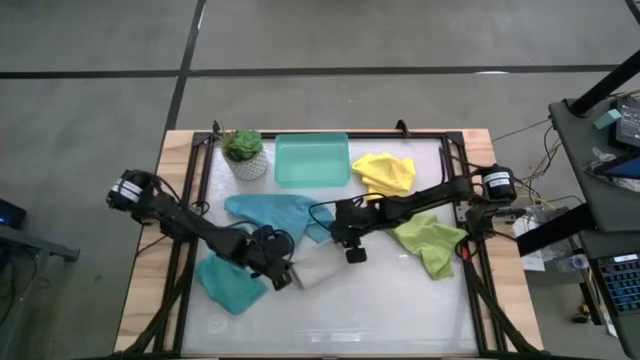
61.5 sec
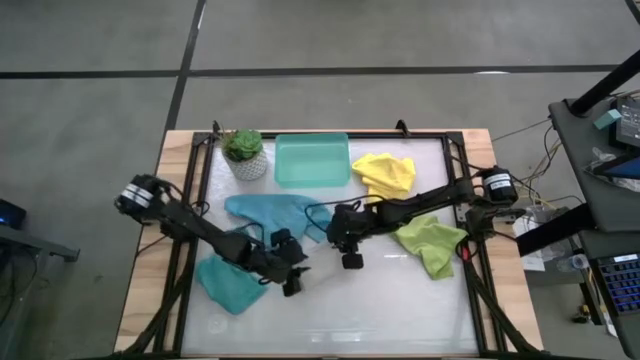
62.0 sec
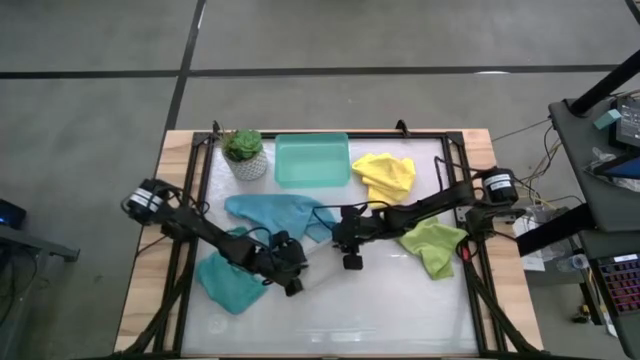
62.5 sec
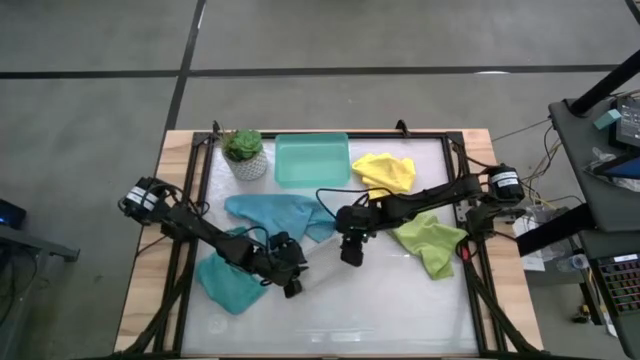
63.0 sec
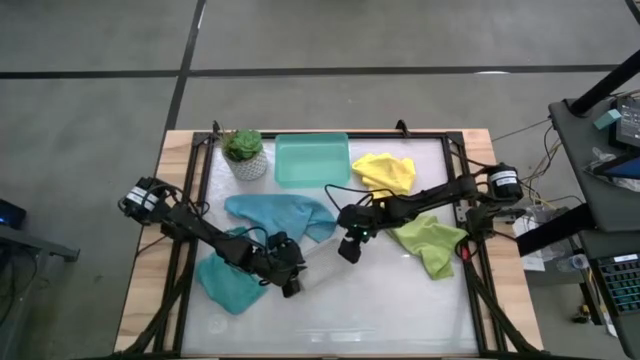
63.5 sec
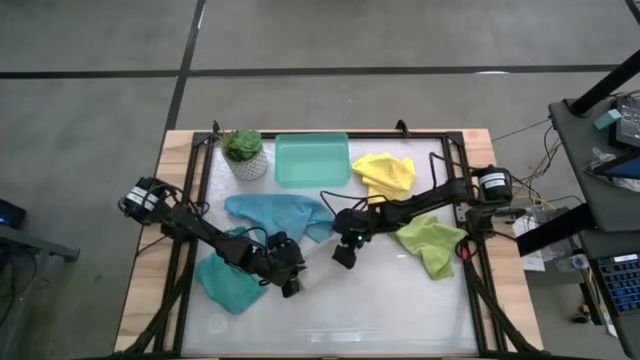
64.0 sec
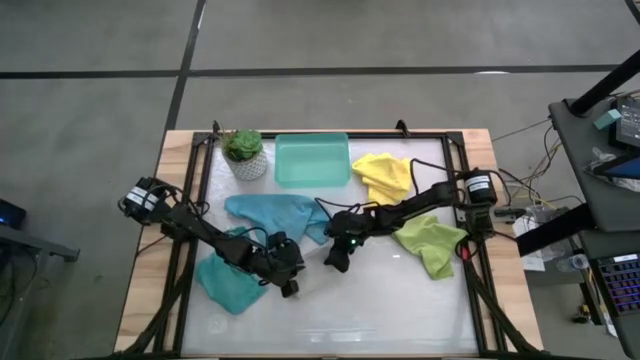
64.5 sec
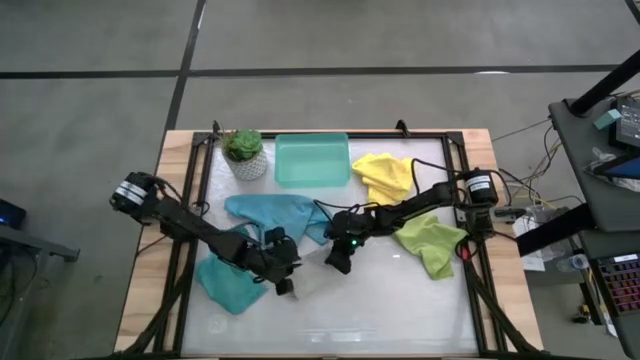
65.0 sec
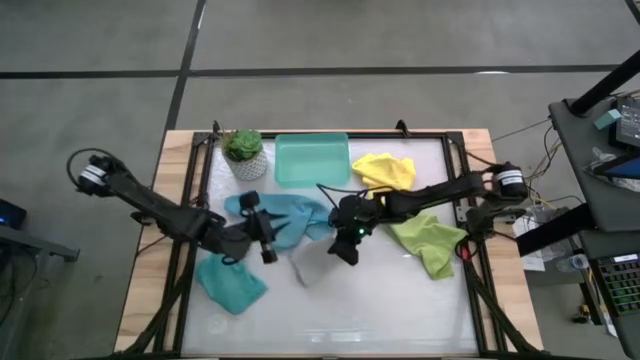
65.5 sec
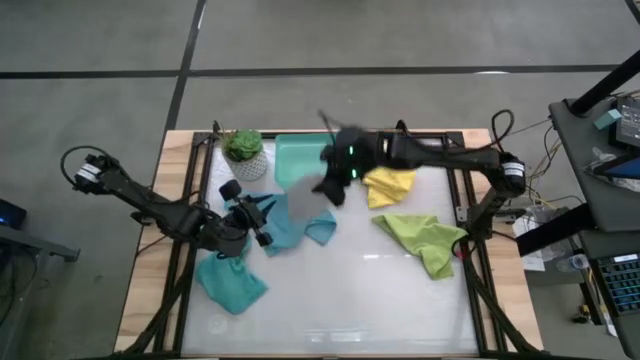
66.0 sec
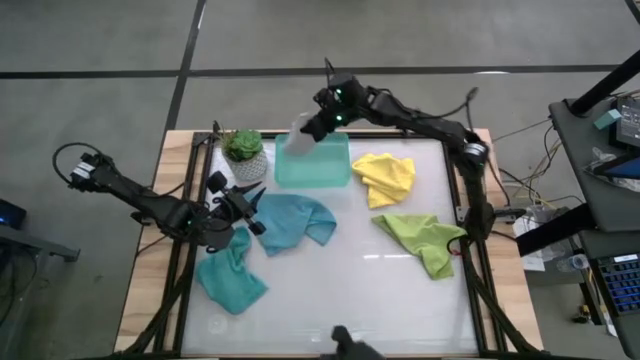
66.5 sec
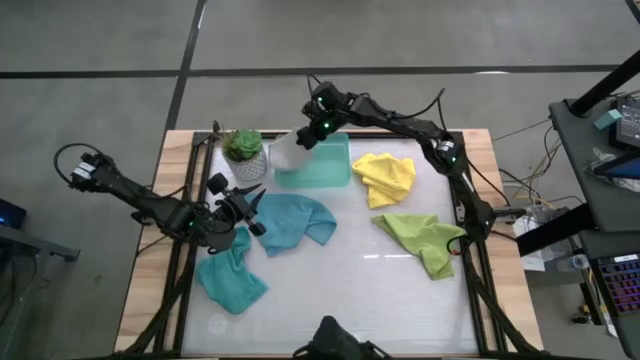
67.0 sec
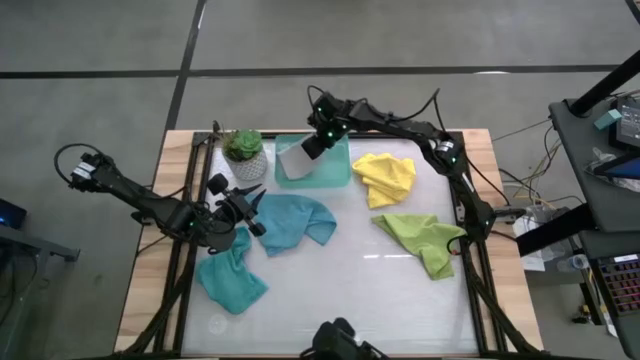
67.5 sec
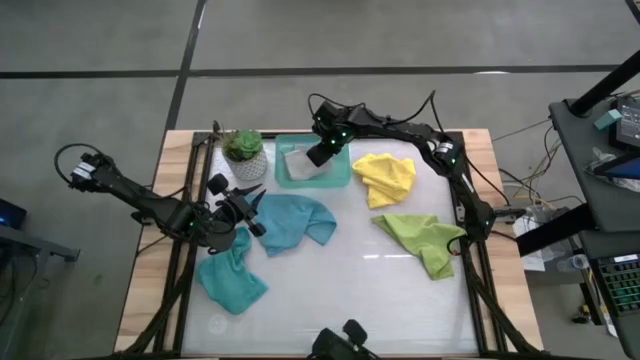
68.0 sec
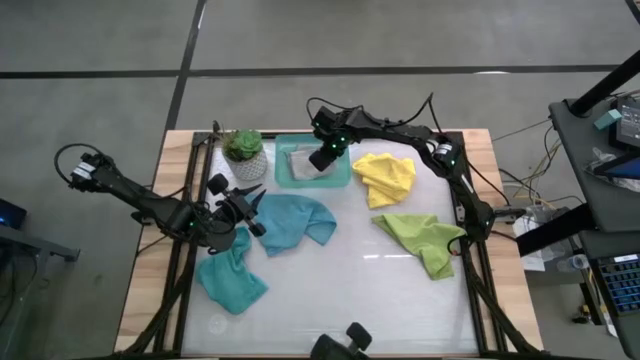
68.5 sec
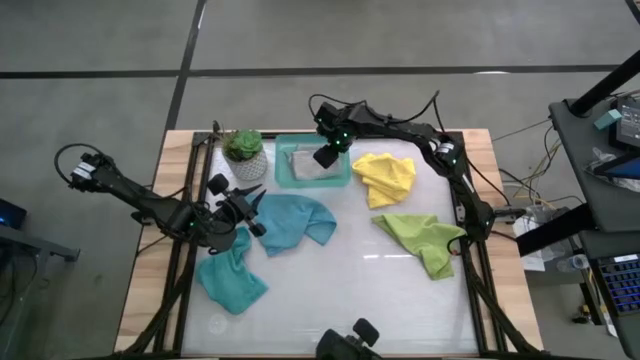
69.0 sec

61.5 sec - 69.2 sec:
Task: Fold microfiber towels
Put the gray microfiber cloth into the green bin

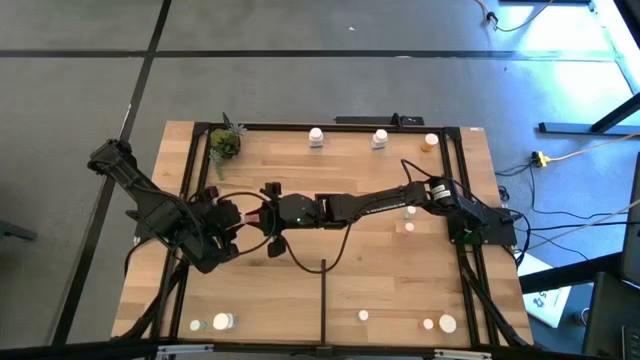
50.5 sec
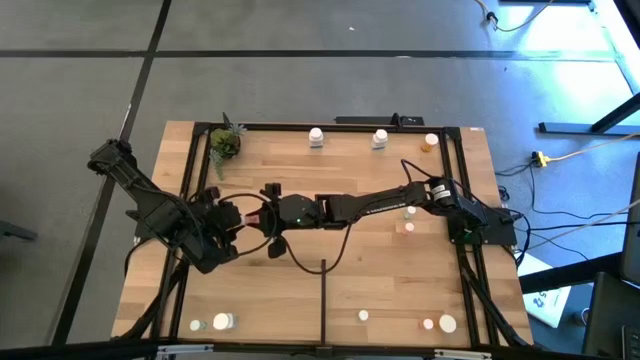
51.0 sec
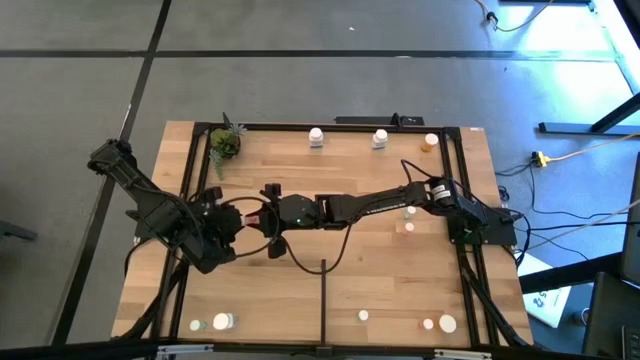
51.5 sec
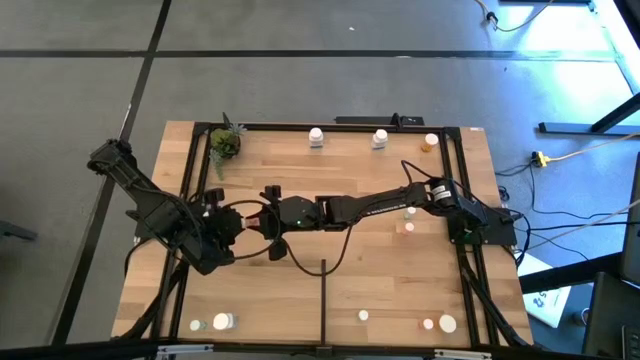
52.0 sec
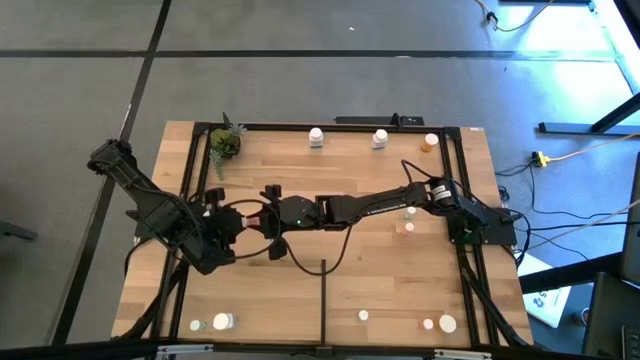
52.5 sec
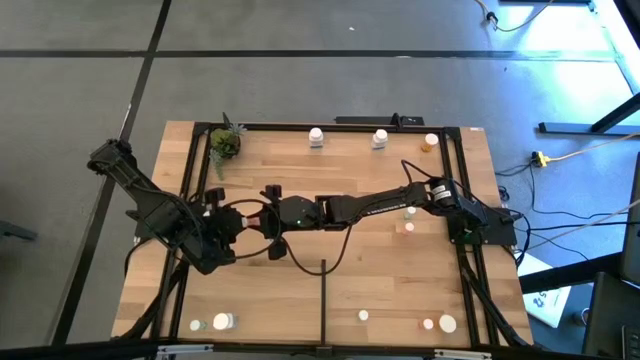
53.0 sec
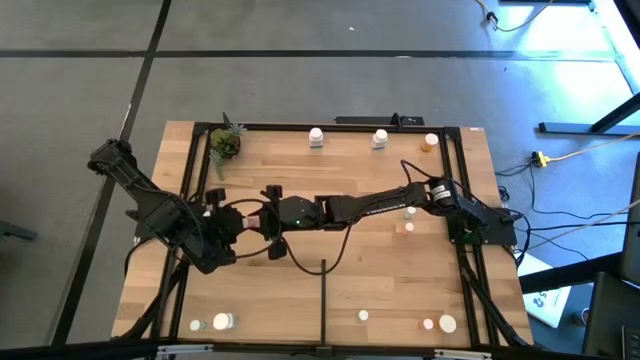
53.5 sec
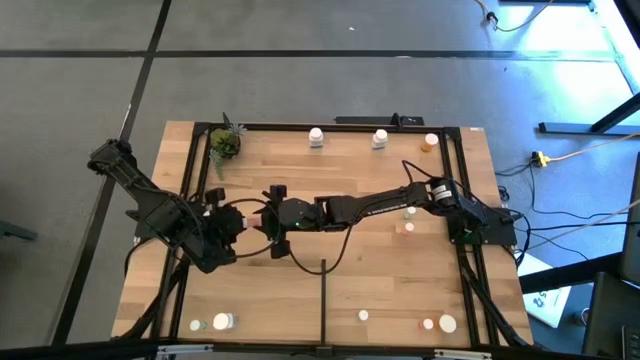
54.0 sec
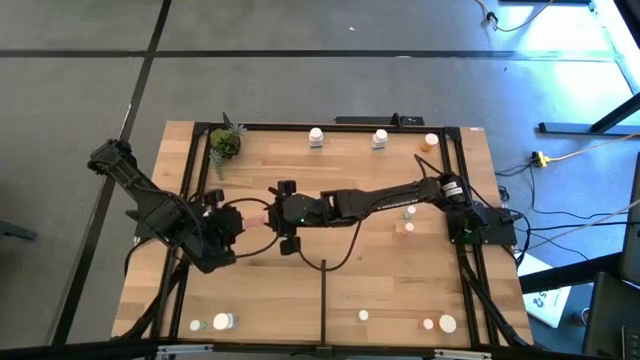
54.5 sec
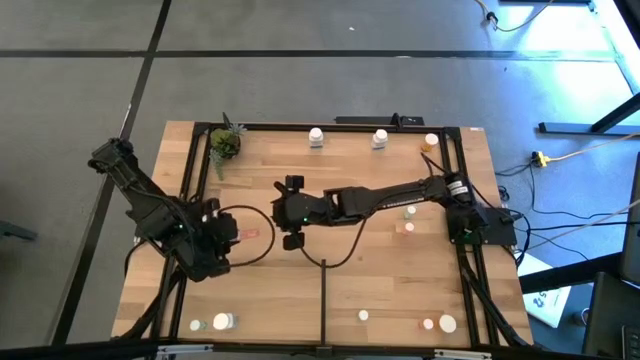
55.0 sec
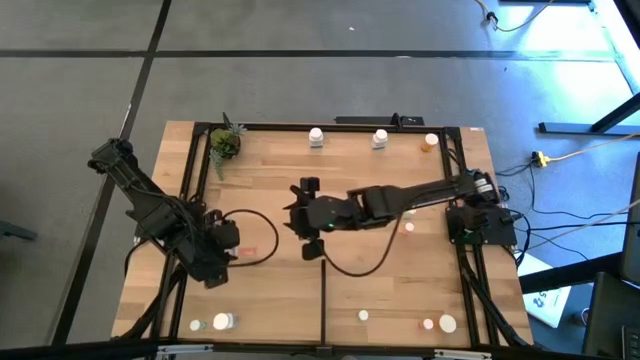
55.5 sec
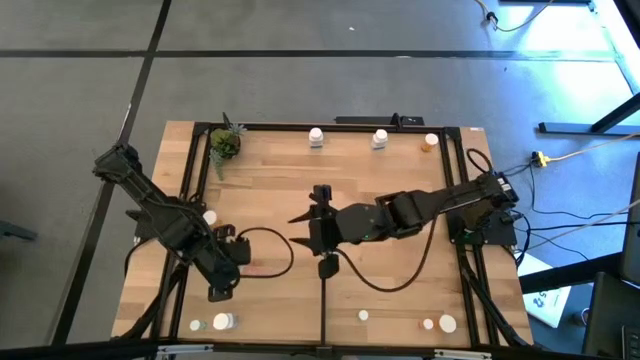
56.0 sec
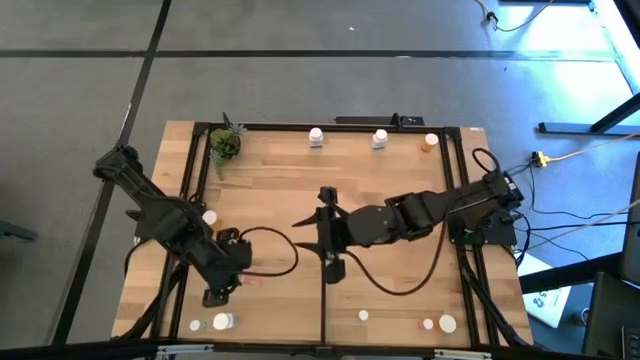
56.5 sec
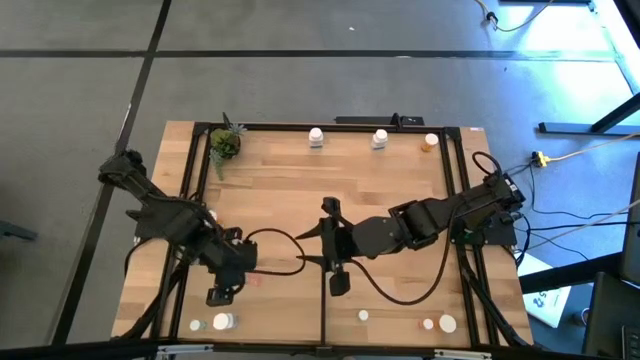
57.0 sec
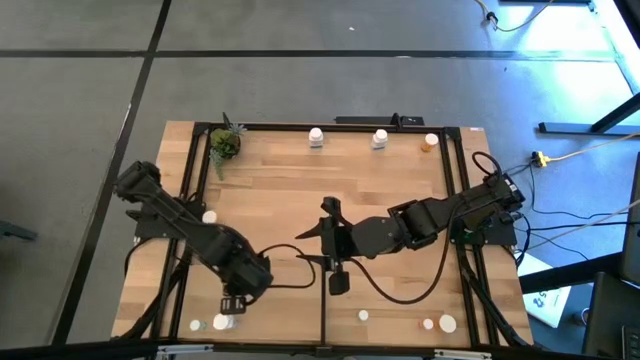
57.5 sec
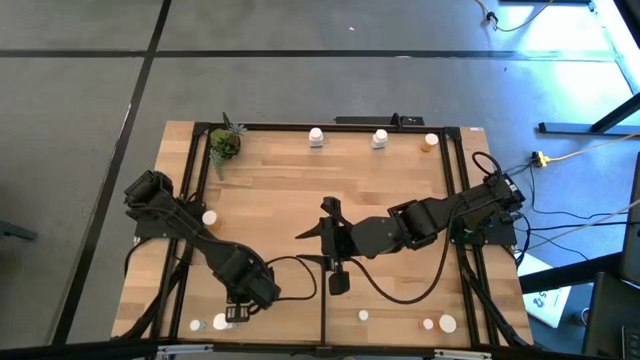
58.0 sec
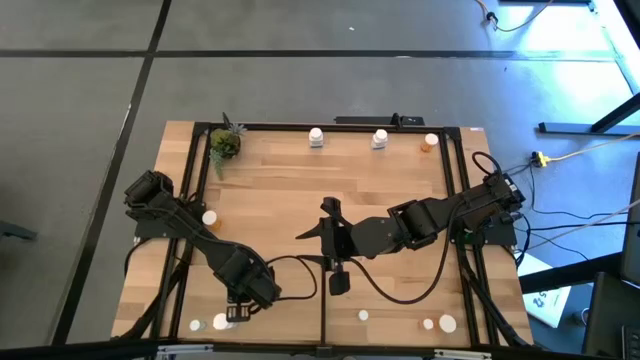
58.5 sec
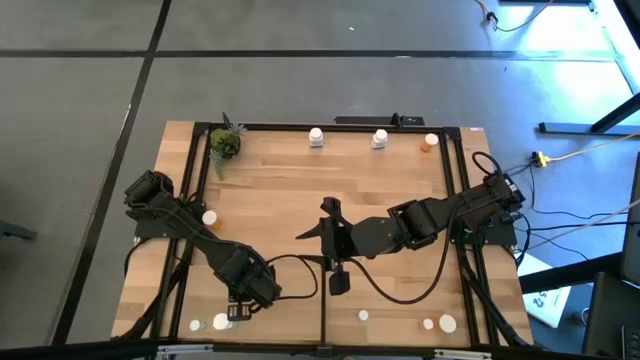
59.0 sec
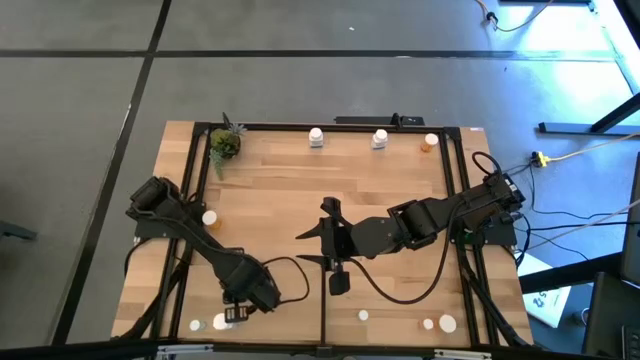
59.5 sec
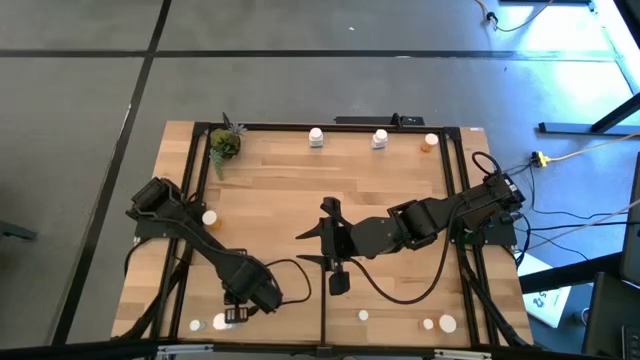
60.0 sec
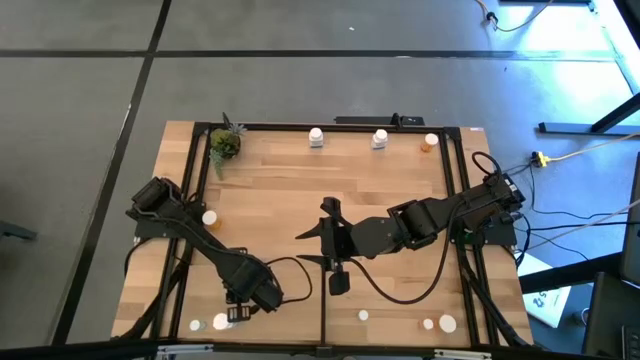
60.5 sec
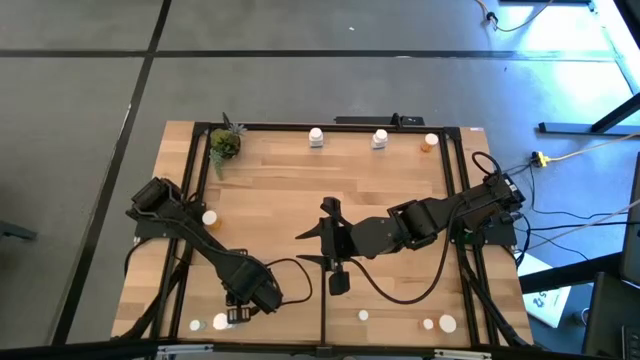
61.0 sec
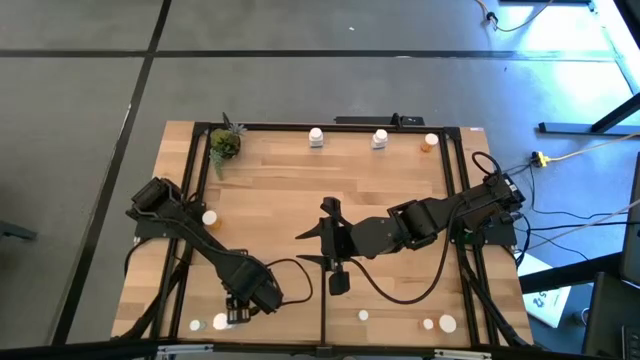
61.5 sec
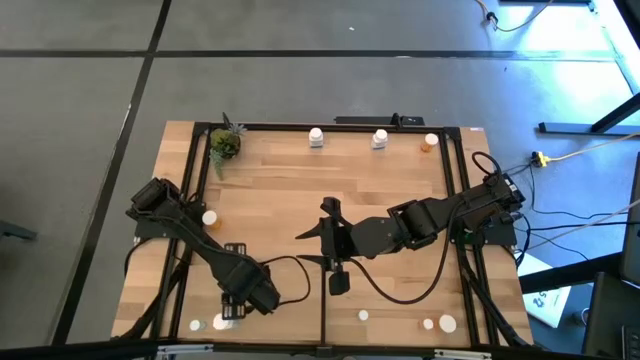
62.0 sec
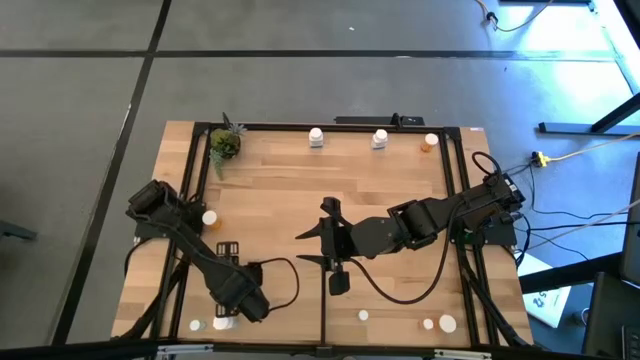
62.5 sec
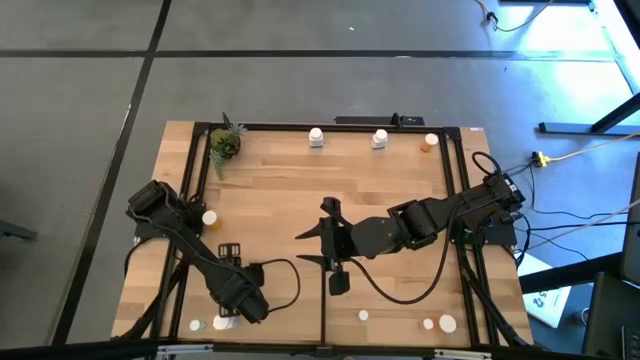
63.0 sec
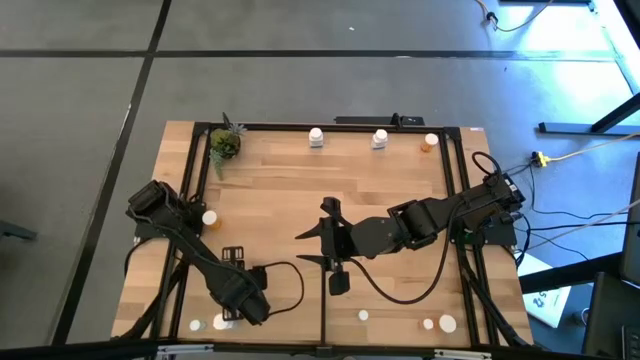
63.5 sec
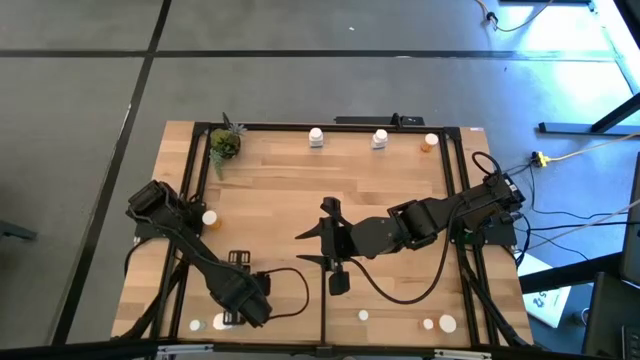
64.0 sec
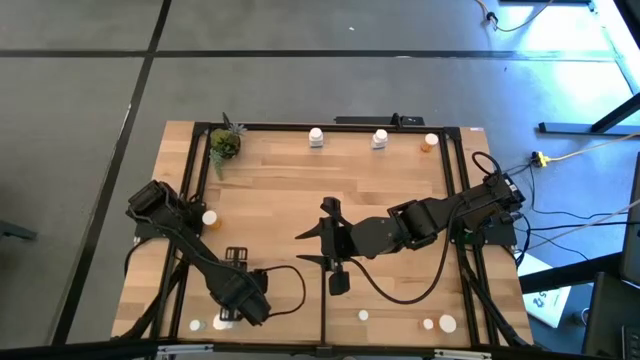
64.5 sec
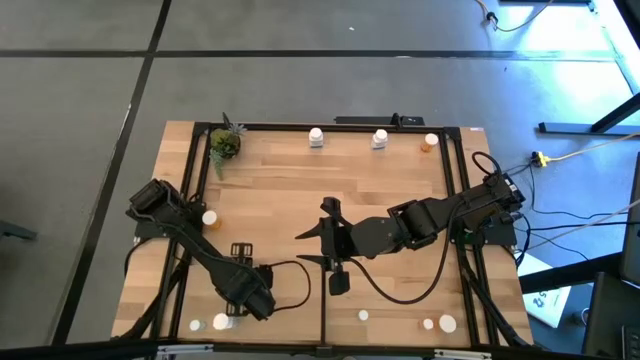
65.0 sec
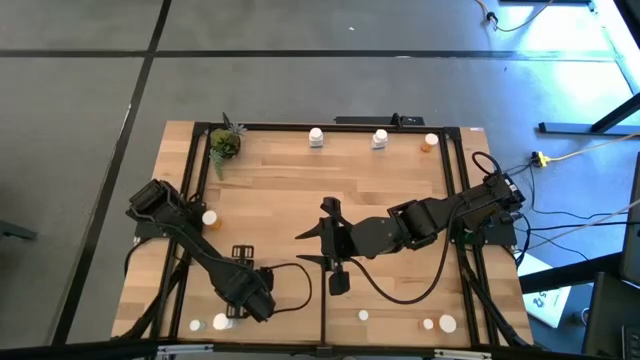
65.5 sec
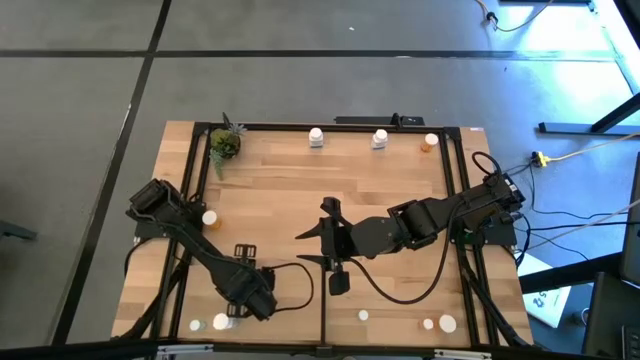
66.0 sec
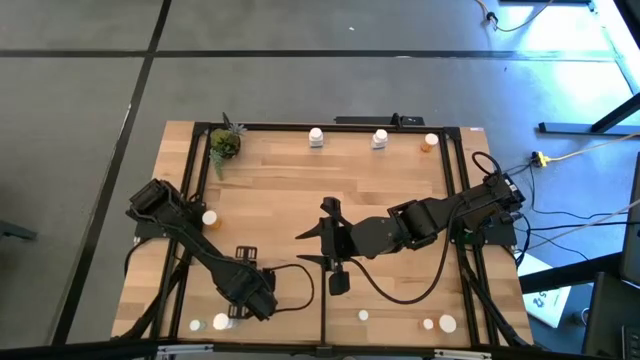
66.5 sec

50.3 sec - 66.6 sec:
Task: Pick and place medicine bottles onto shelf by color
Put the top left pink pill bottle on the shelf
